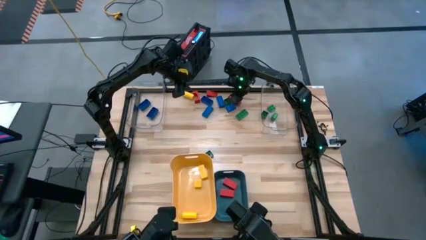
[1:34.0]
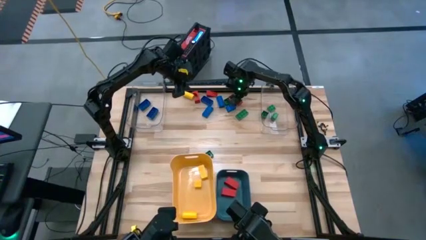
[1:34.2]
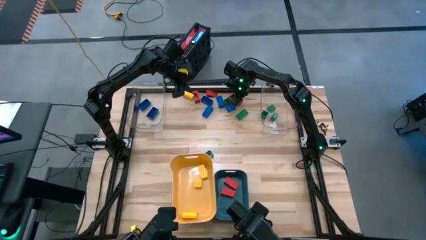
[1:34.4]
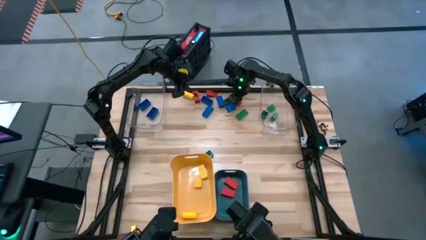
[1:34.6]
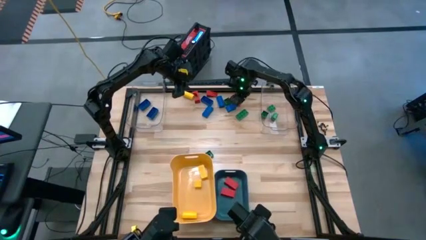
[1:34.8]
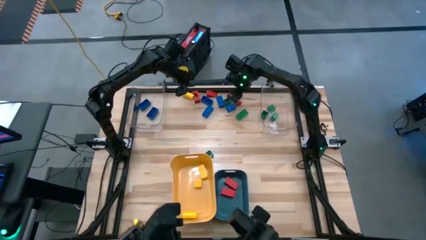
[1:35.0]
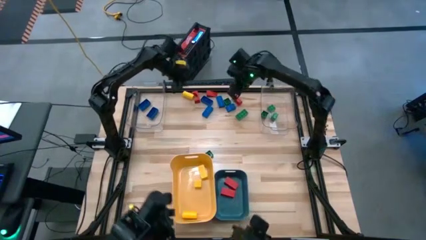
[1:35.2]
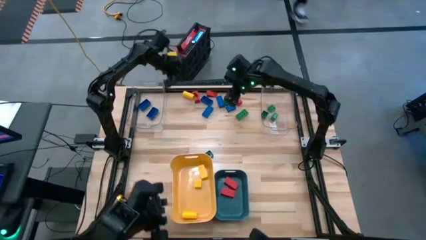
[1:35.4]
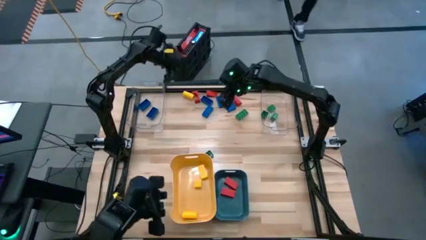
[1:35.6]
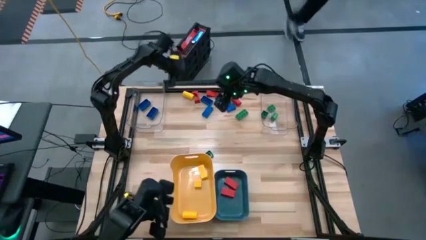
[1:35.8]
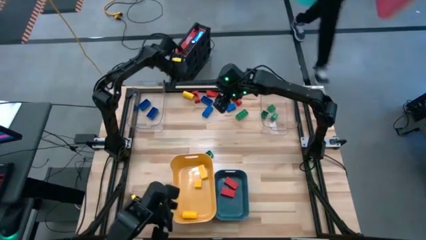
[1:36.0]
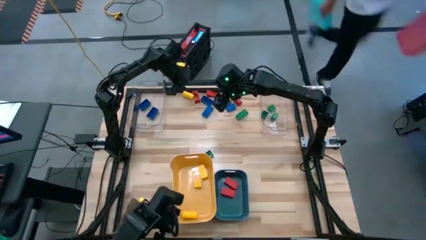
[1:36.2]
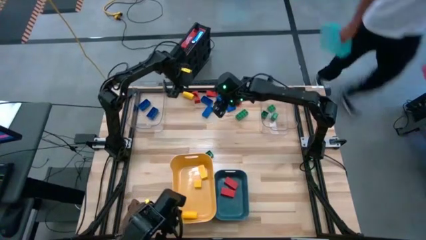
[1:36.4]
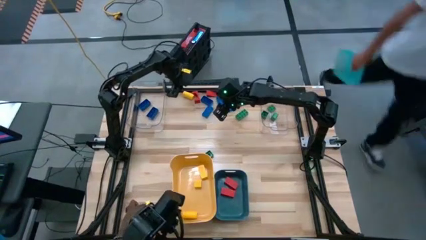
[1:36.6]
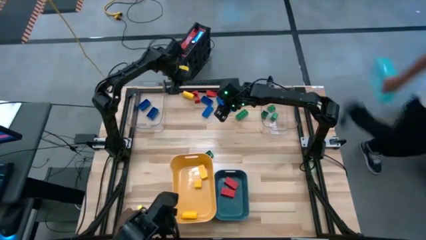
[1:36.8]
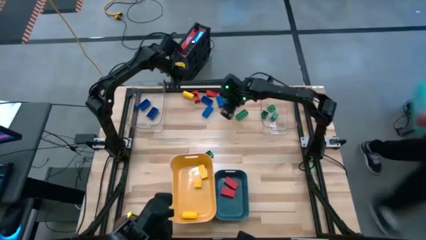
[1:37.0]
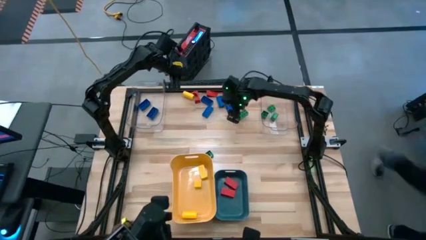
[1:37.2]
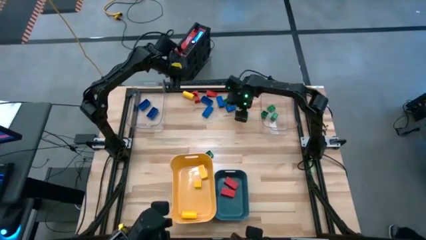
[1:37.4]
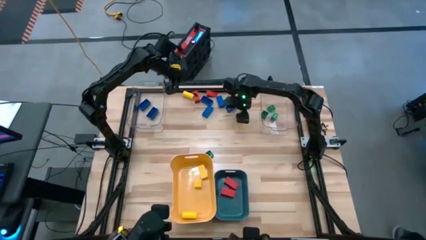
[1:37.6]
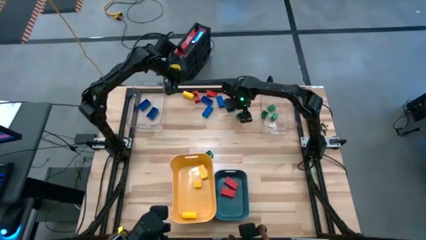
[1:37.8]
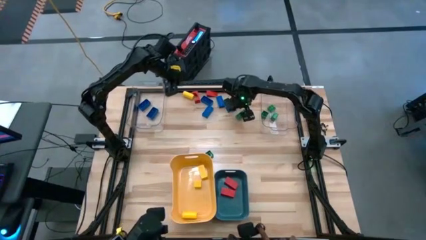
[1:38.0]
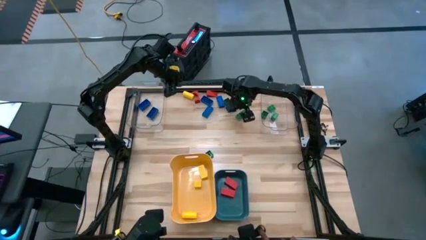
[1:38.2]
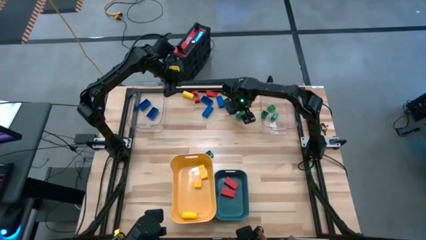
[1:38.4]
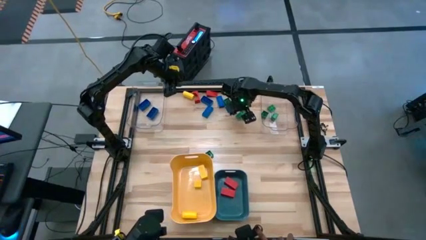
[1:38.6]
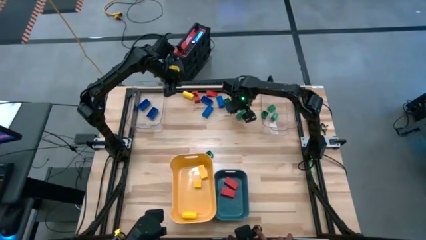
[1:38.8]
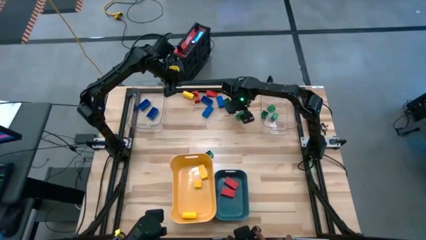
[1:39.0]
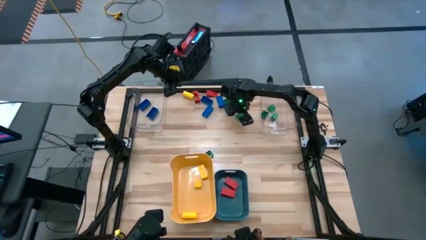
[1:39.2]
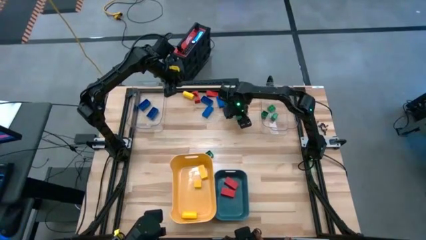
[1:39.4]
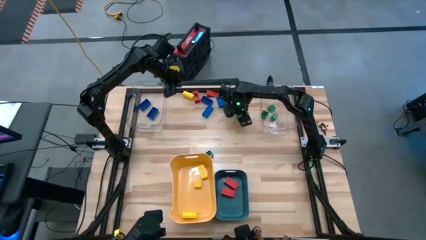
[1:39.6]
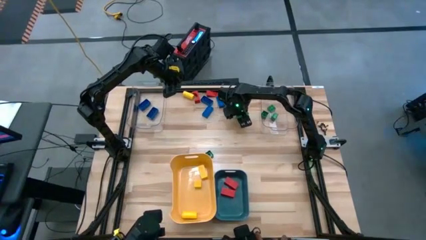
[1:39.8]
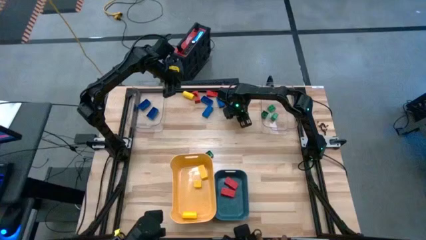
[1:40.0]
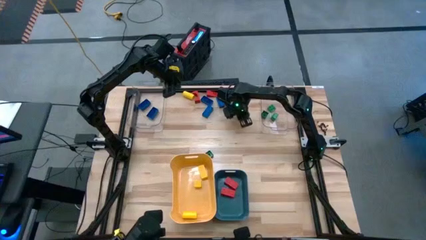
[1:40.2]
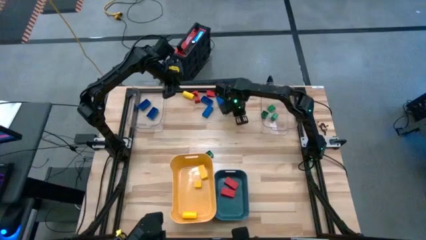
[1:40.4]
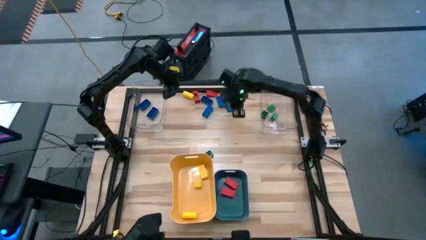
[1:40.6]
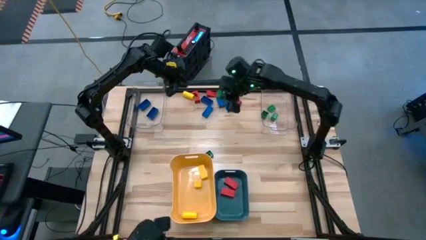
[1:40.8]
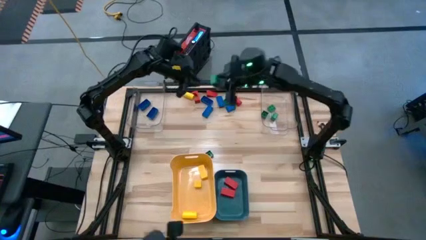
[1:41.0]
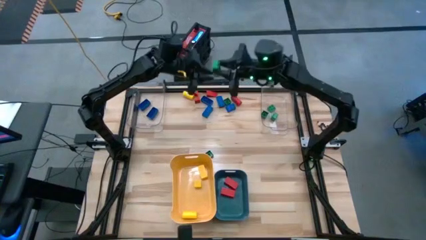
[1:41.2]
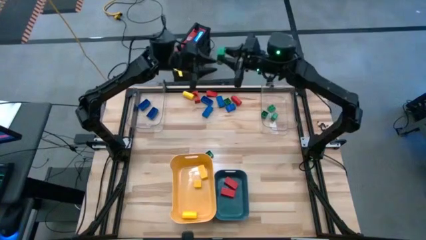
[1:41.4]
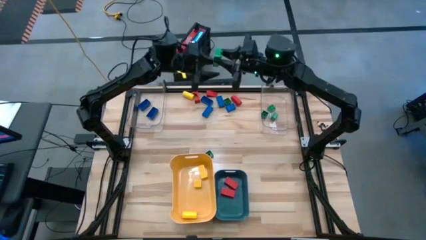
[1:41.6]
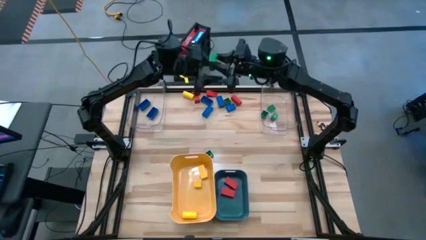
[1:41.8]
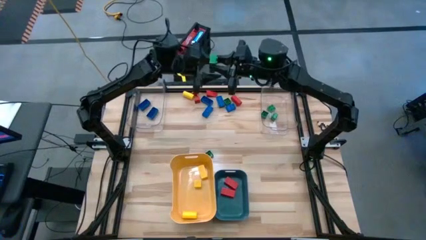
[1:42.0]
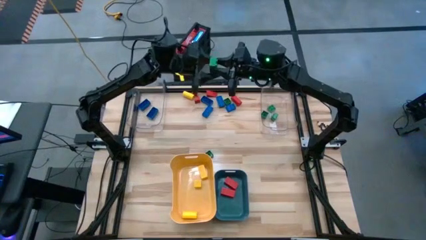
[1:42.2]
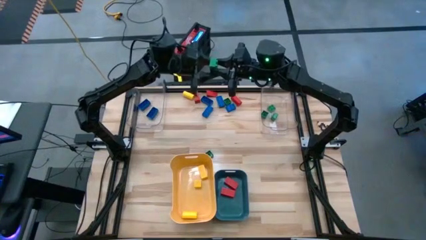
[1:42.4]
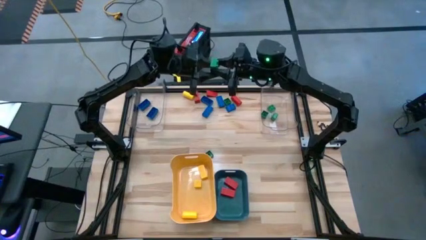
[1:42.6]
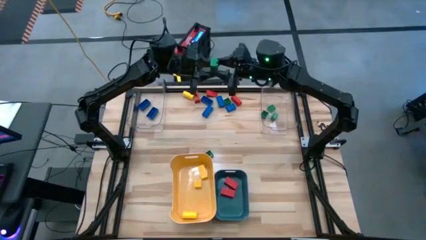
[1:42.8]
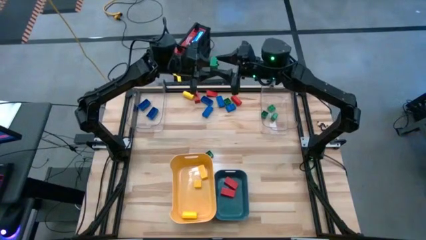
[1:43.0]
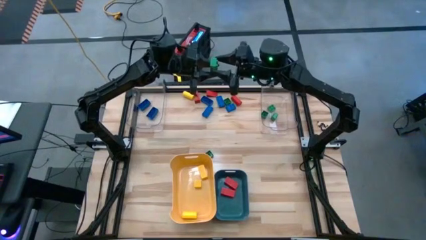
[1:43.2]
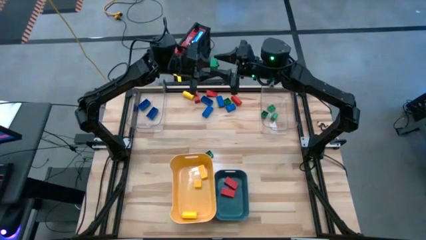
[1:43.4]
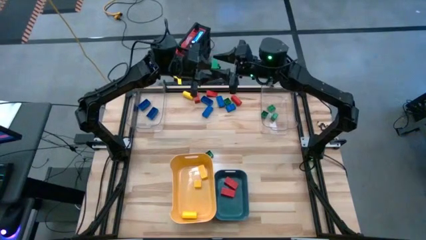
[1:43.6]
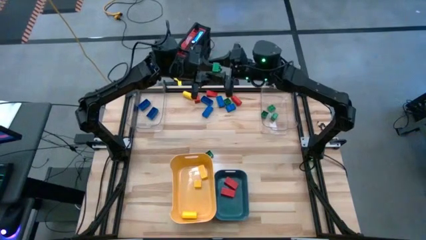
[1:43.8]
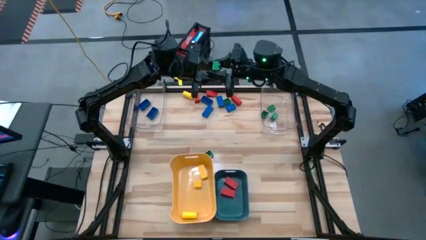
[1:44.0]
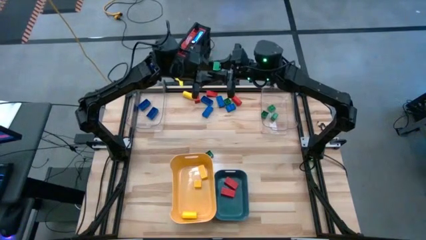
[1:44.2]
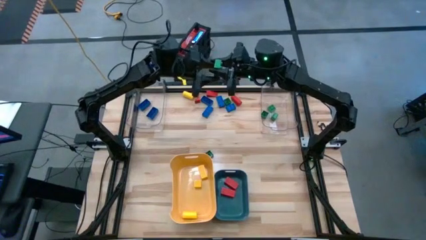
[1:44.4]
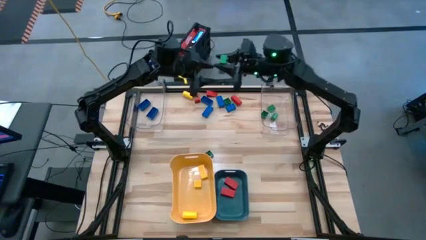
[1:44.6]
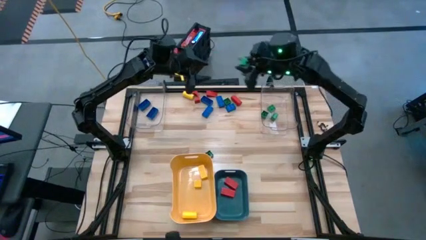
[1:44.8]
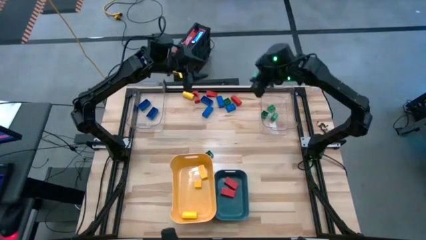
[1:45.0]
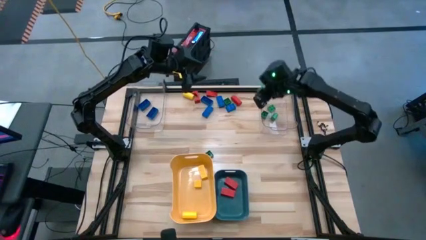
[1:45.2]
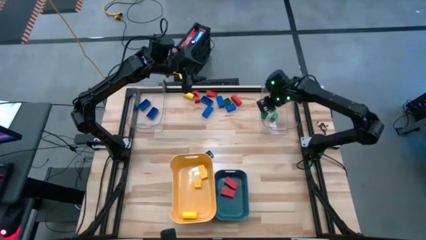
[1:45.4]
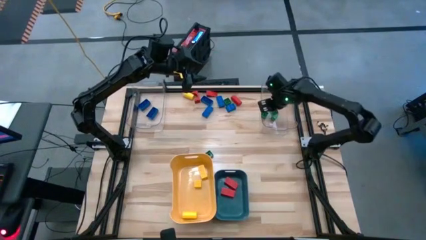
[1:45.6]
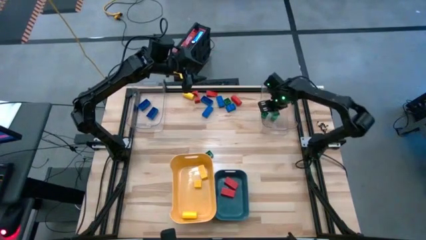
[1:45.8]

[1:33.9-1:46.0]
Task: Sort blocks
Put the green game piece into the right transparent bin

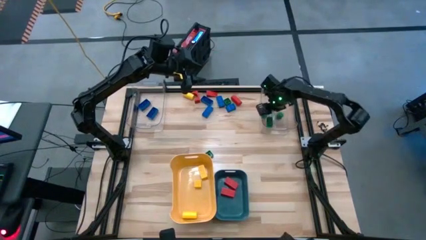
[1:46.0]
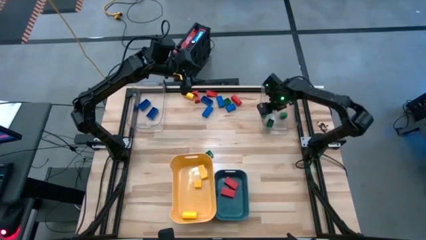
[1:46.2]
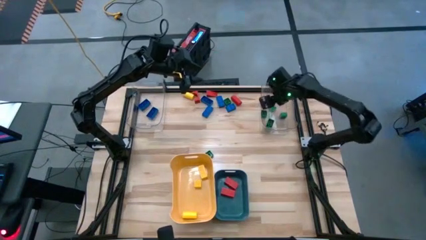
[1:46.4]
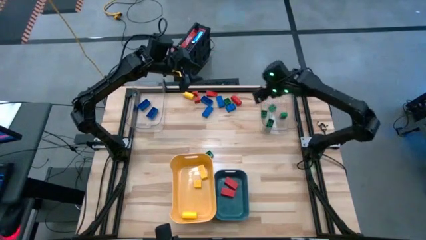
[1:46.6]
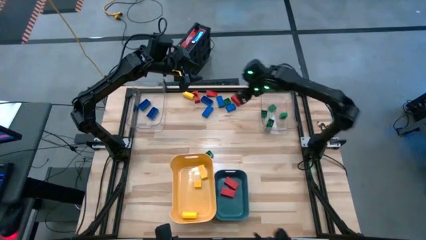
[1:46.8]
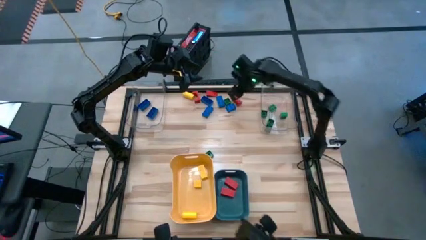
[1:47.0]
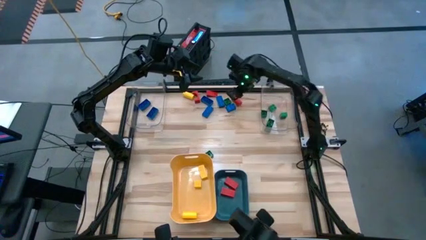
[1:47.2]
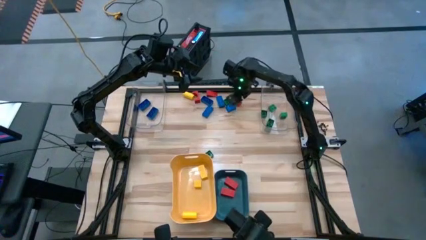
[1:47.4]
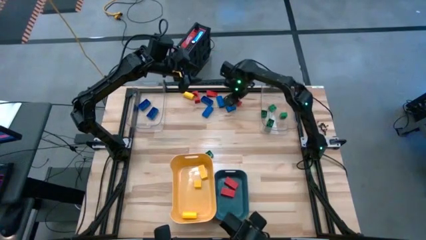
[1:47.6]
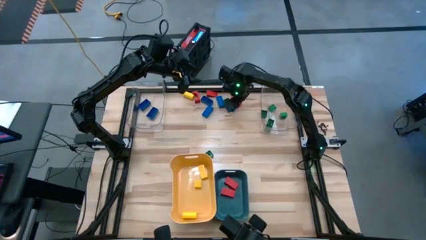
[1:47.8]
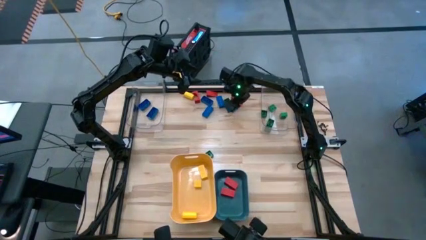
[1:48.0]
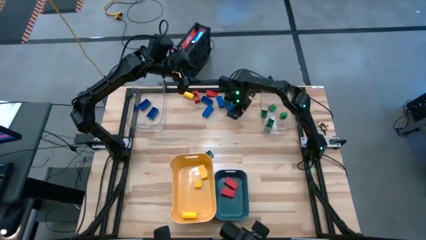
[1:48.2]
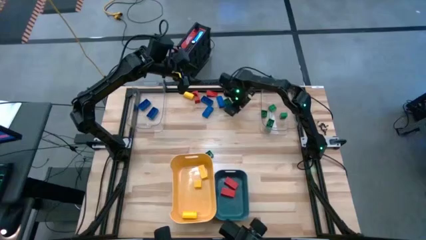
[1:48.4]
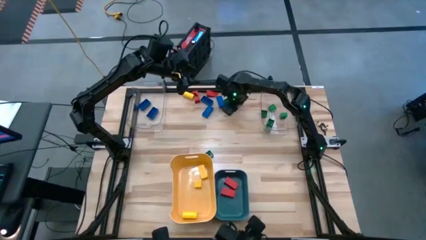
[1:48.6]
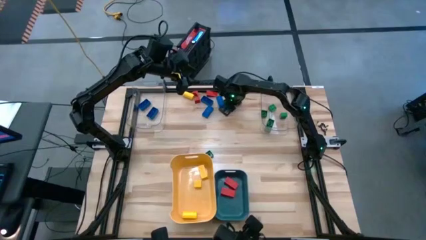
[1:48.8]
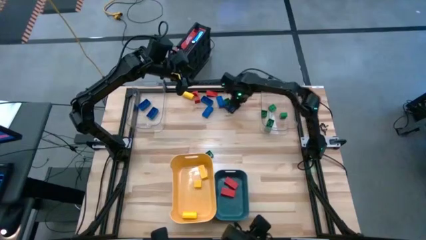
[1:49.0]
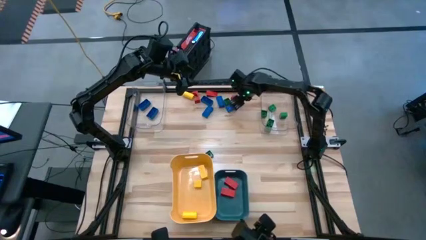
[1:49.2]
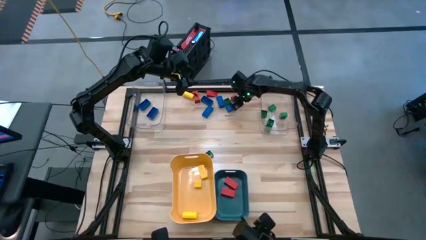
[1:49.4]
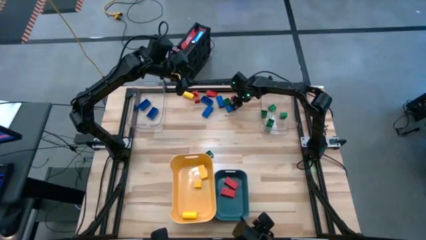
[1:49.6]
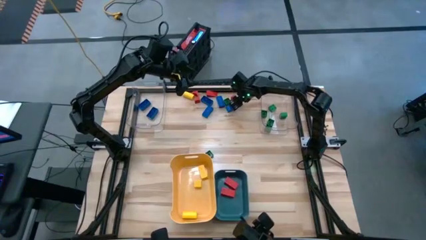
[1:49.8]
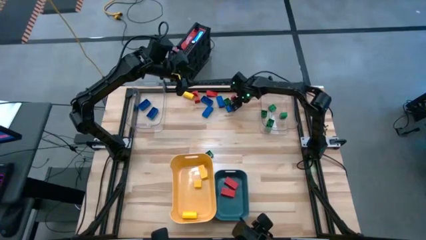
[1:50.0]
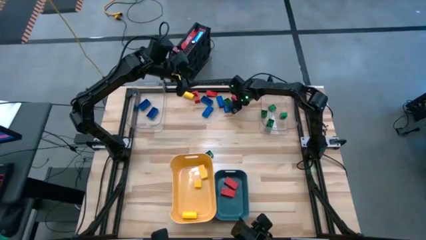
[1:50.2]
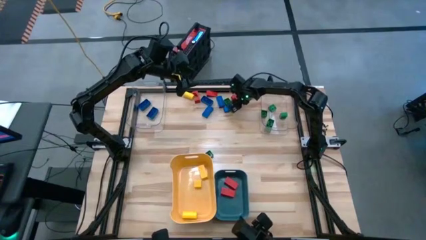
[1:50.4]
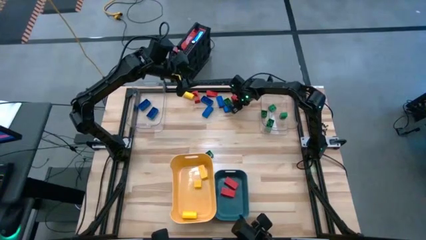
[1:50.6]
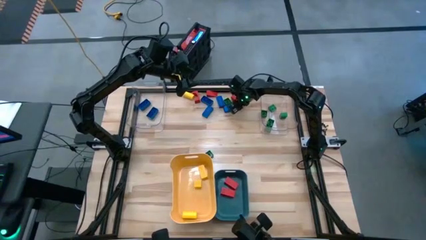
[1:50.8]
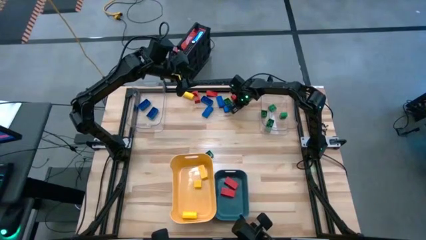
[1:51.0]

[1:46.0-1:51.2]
Put the red block into the blue bin
